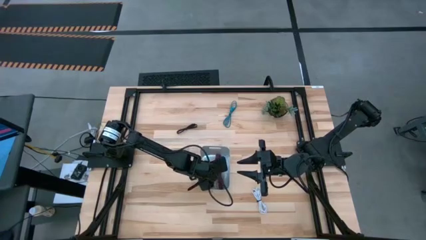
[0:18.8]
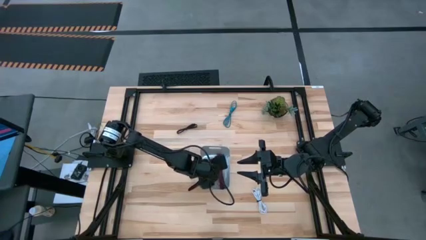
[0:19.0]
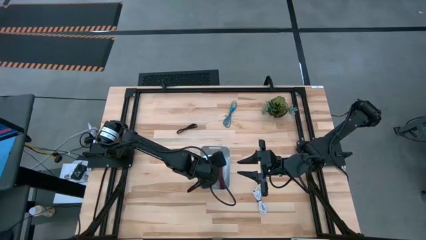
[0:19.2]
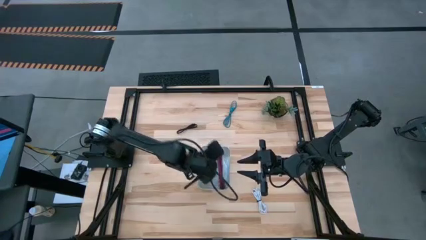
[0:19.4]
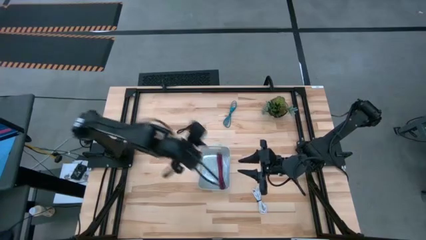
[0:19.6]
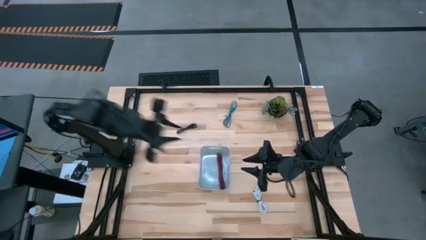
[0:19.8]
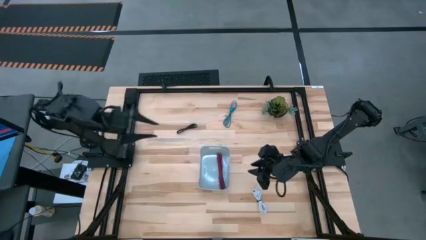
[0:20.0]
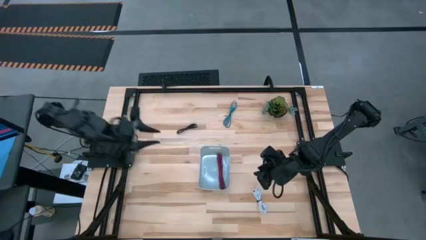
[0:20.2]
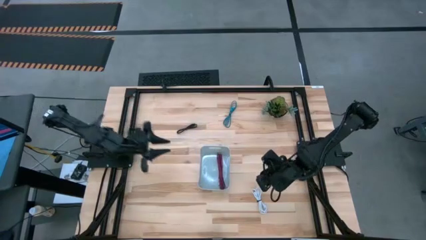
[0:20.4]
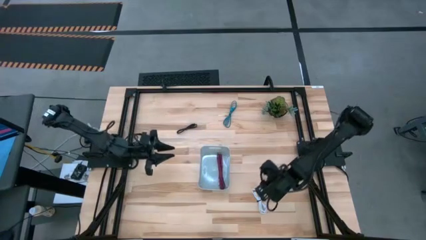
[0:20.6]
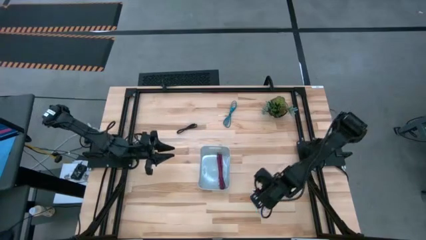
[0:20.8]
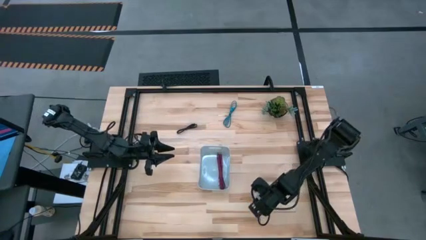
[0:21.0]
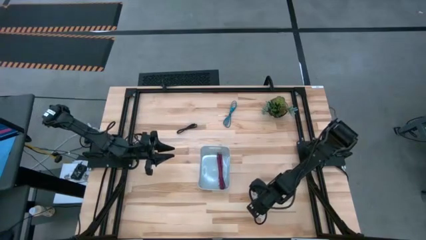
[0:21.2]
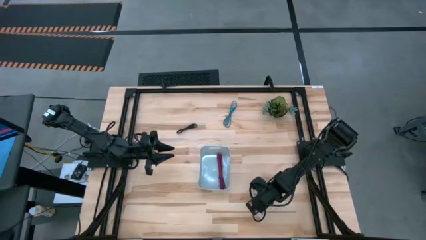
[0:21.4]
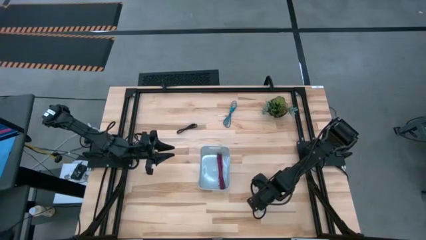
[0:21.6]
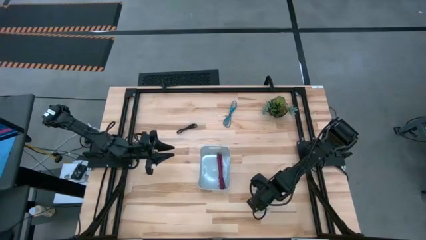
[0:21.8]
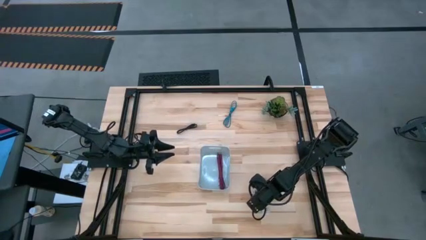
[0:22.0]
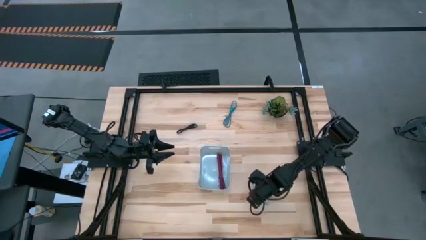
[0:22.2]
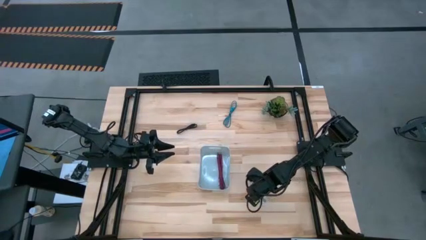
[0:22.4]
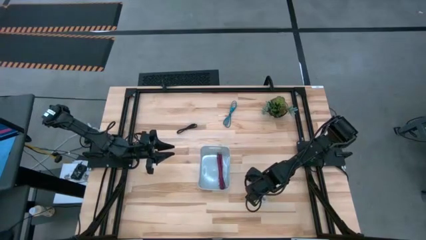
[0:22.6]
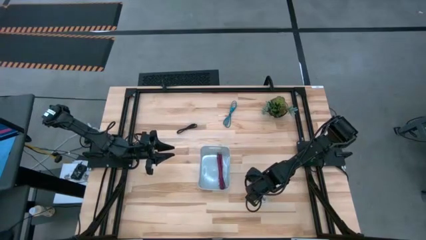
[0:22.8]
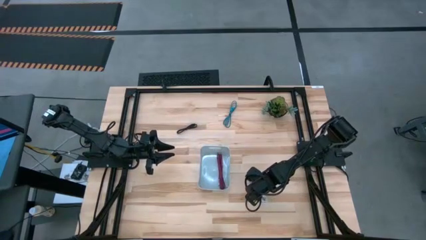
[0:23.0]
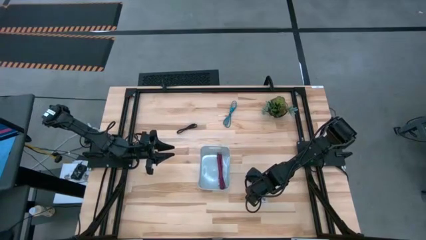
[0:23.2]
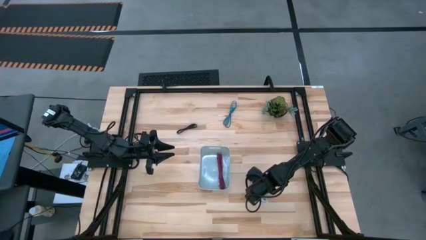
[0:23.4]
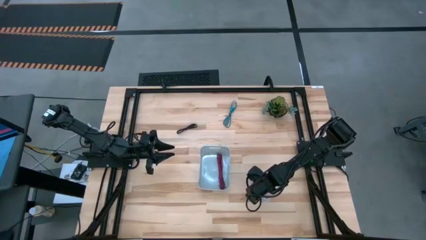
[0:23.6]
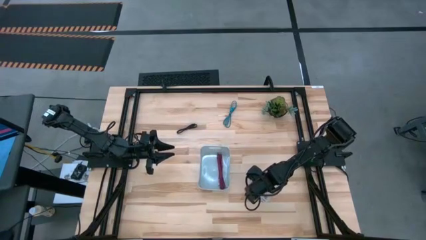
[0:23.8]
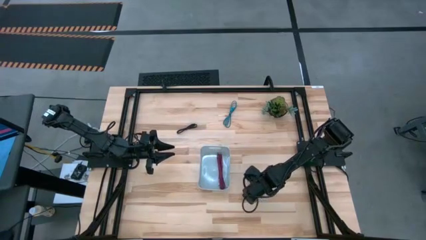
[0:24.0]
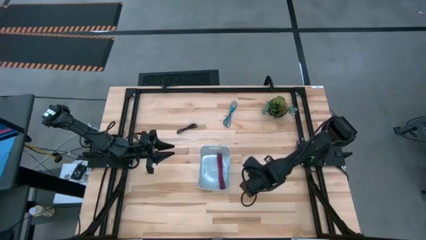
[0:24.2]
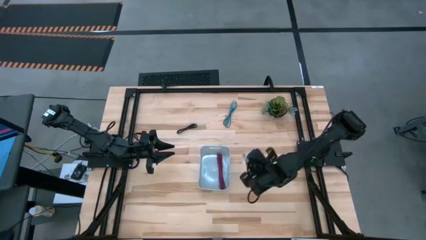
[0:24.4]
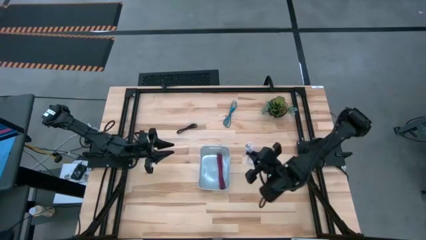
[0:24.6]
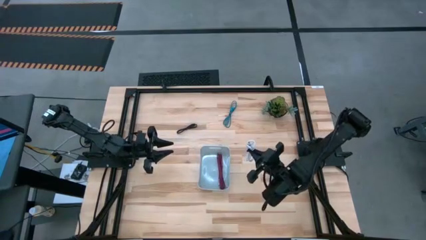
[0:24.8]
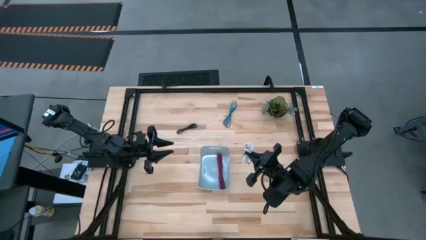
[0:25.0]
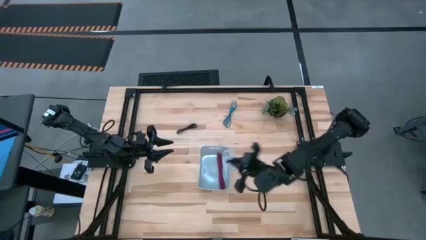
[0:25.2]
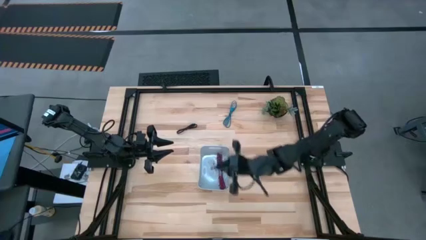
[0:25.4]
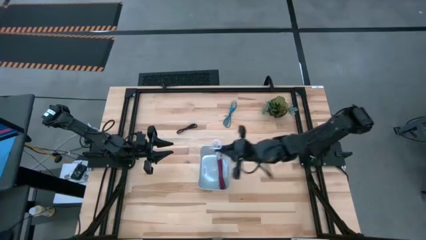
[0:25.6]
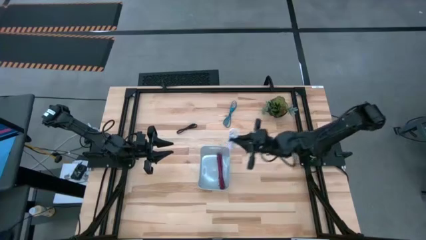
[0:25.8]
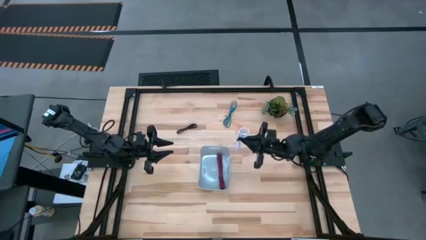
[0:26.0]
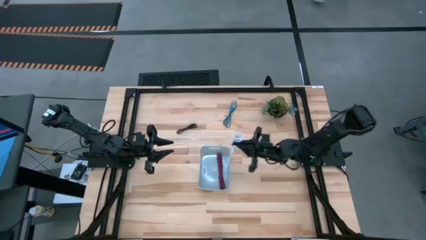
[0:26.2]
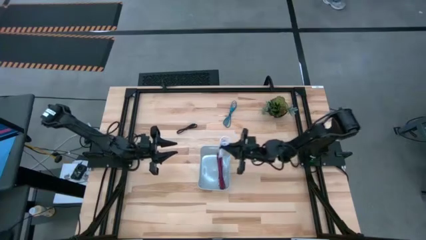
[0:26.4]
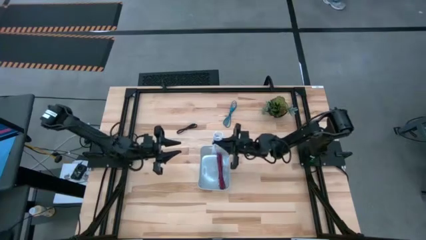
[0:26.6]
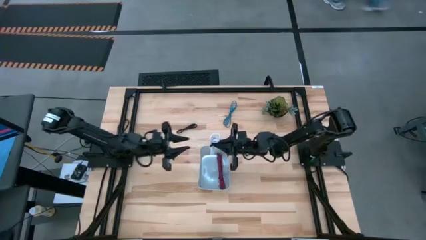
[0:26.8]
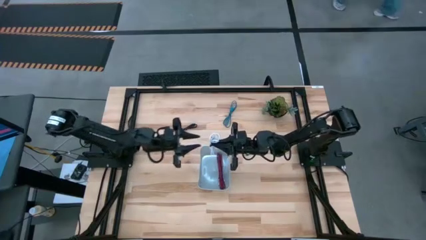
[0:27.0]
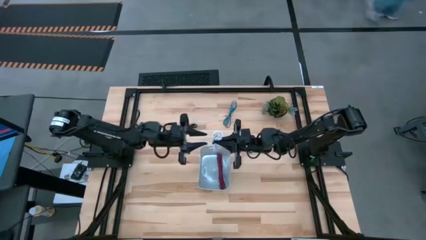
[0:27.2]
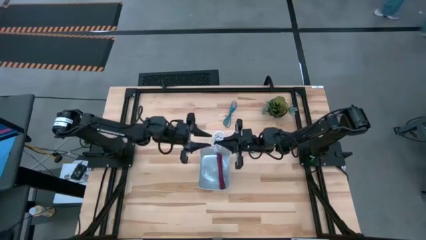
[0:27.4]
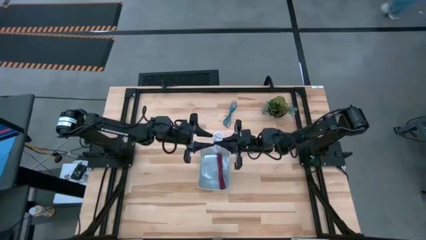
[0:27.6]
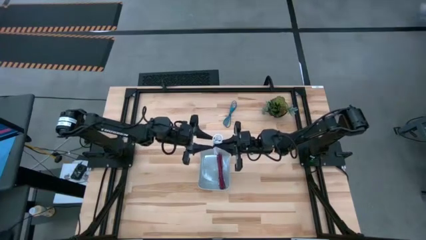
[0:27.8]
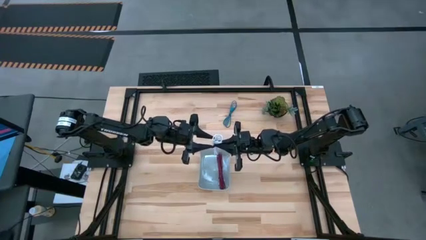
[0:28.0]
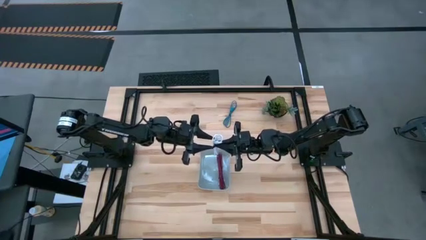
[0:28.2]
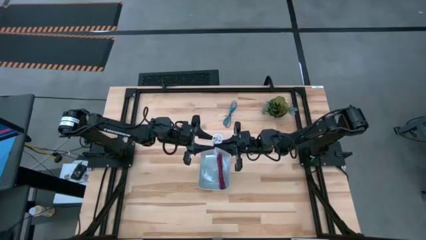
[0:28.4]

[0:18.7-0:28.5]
Task: Pick and place USB-C Cables
Put the white charger cable into the gray bin

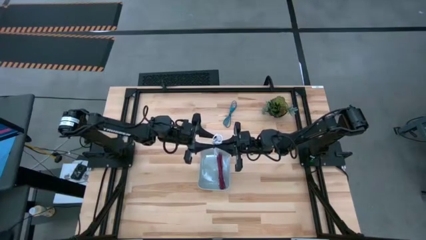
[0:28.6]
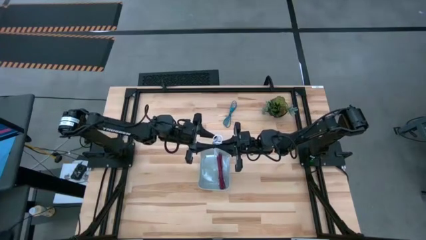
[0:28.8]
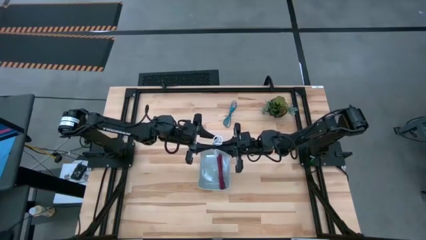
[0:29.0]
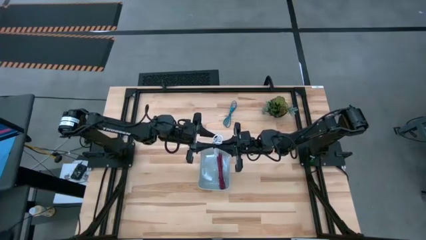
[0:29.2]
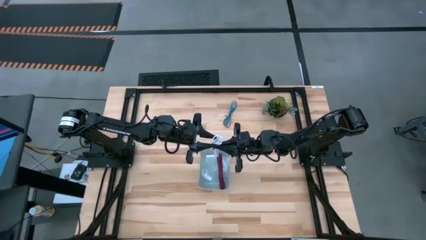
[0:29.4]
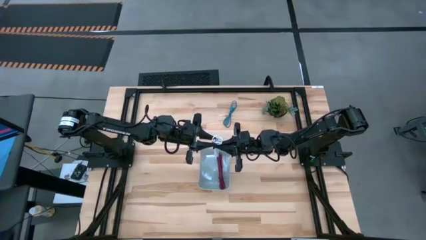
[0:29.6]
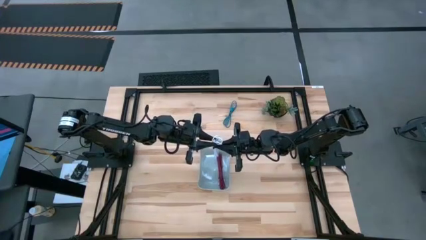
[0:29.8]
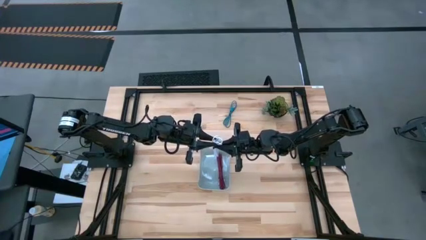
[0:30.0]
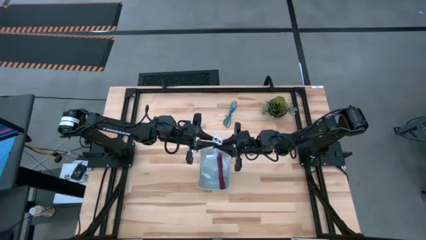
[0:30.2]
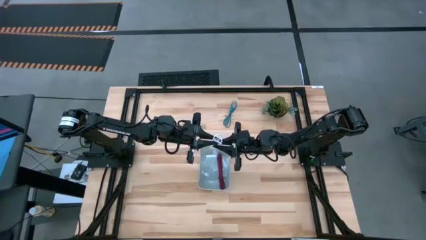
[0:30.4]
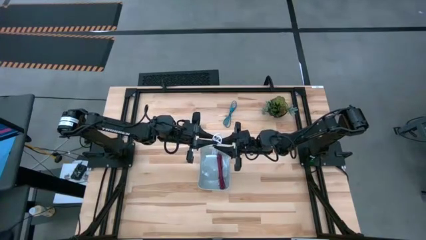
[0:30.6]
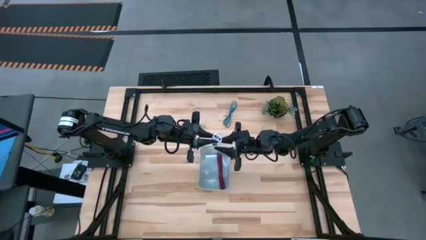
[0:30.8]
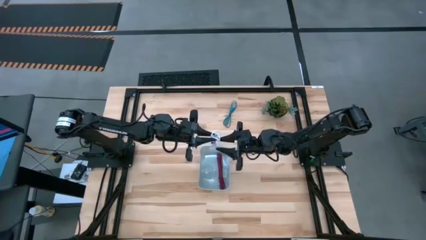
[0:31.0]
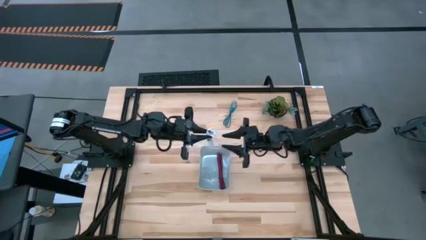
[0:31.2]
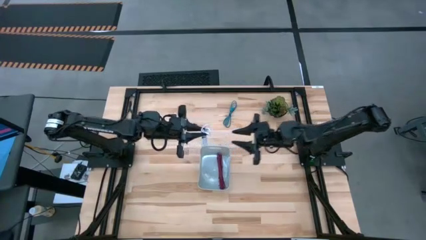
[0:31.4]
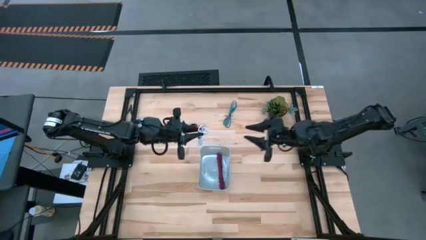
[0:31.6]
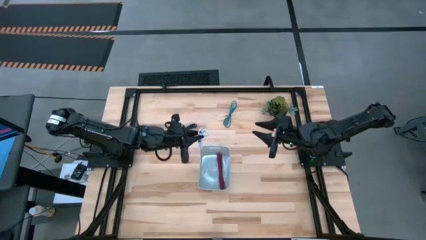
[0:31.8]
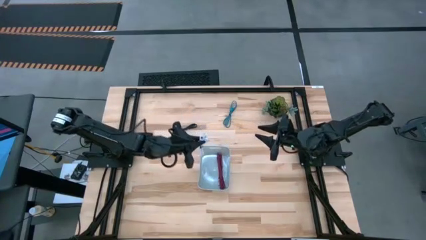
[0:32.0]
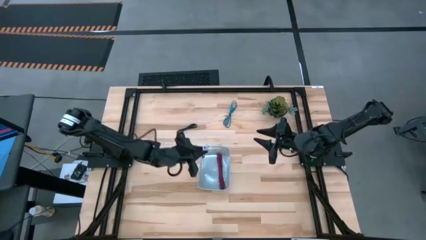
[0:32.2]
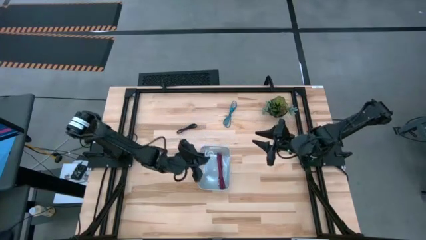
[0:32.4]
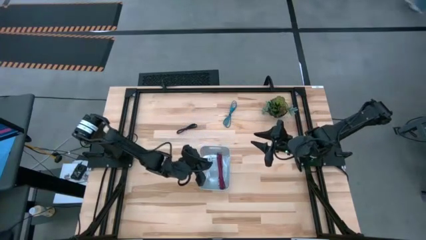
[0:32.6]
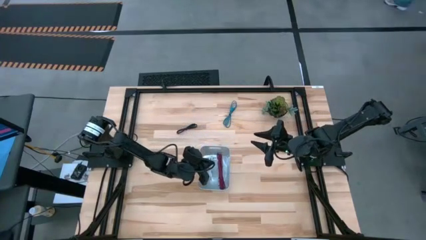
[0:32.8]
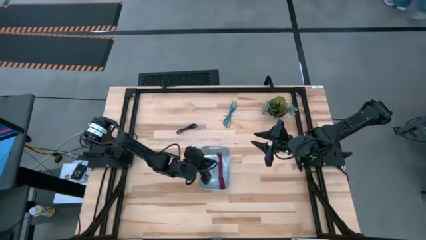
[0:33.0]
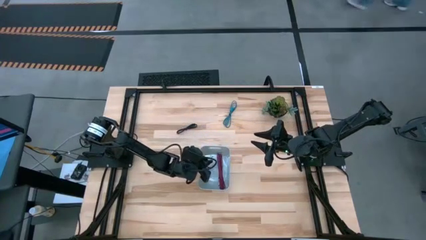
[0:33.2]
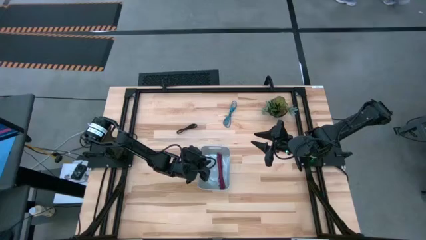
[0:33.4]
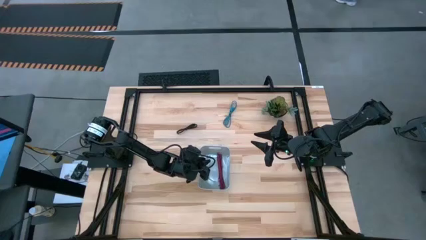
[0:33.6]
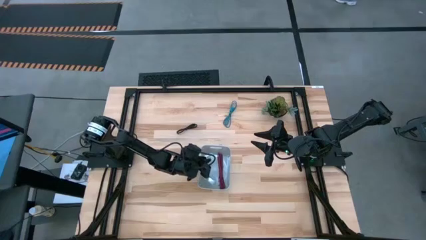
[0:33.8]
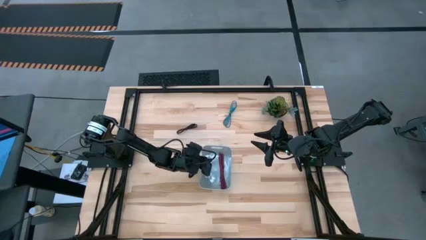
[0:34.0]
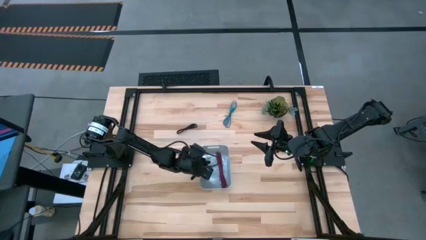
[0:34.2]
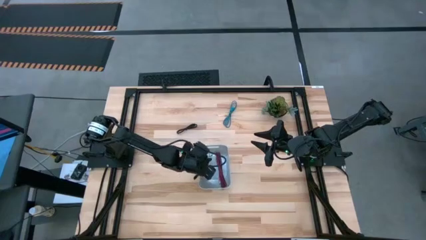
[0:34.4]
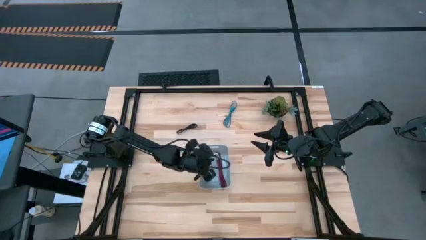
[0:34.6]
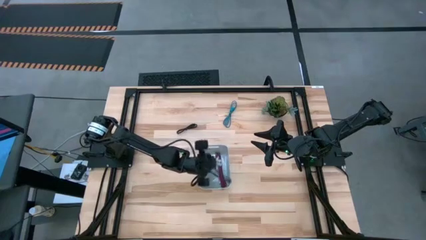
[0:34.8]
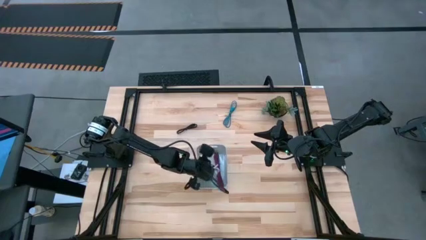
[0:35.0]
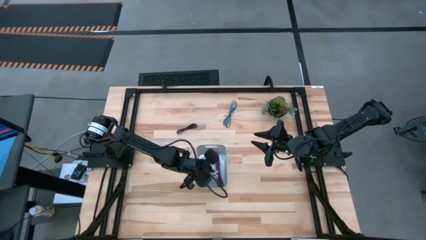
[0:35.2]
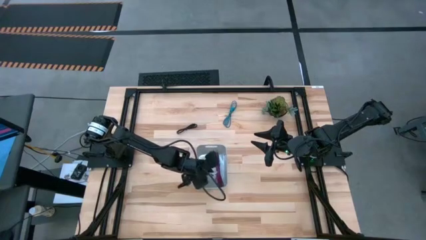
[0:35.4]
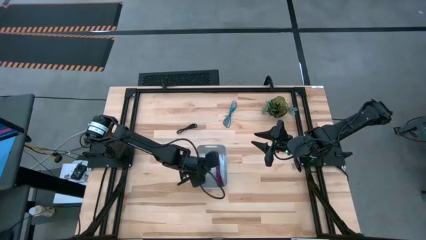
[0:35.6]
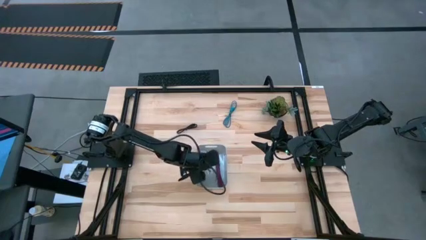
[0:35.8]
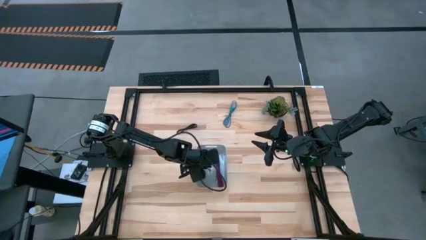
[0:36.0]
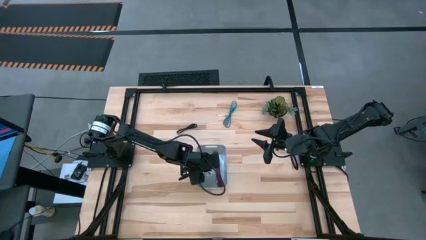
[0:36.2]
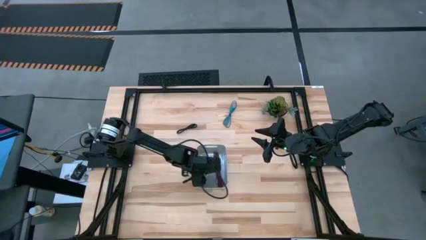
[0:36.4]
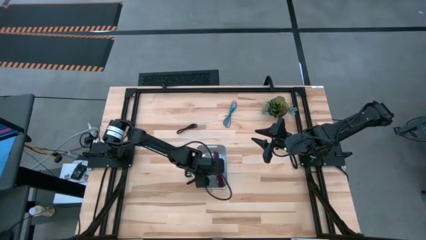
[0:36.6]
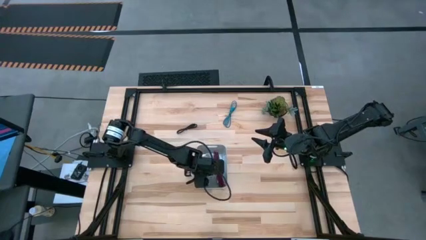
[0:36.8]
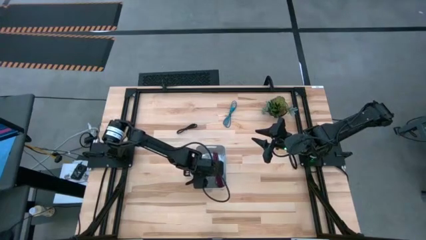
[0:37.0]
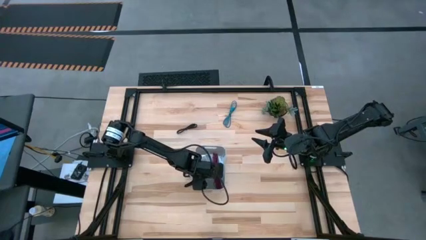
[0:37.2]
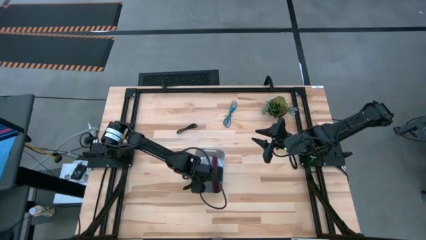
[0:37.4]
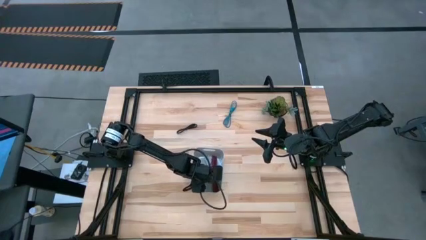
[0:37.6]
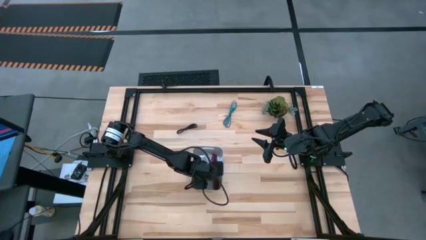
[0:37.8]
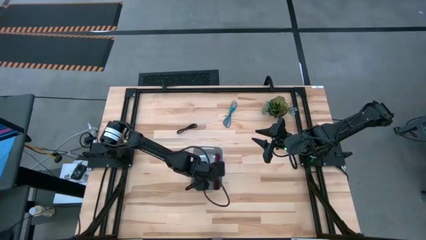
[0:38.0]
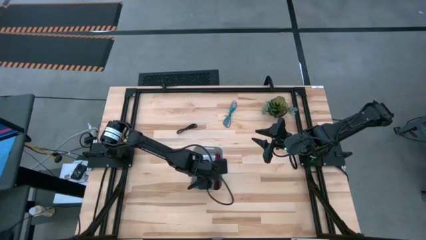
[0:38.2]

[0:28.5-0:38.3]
Put the white charger cable into the gray bin
